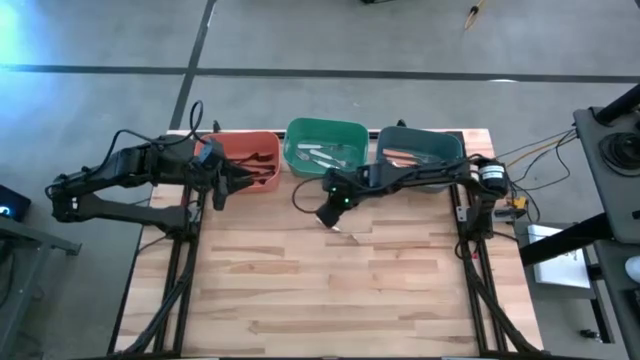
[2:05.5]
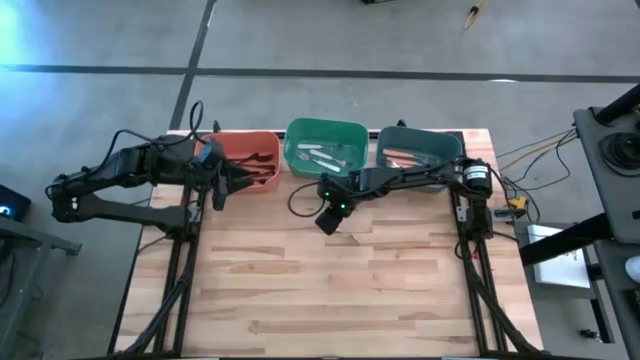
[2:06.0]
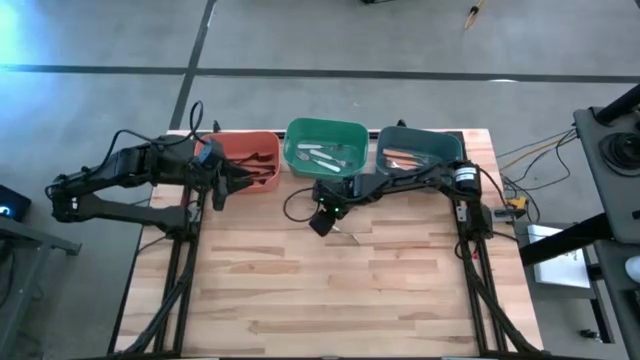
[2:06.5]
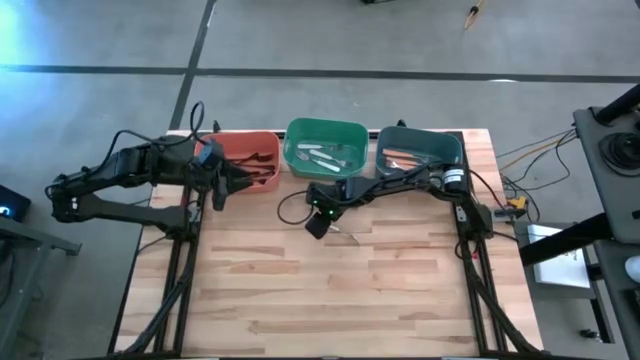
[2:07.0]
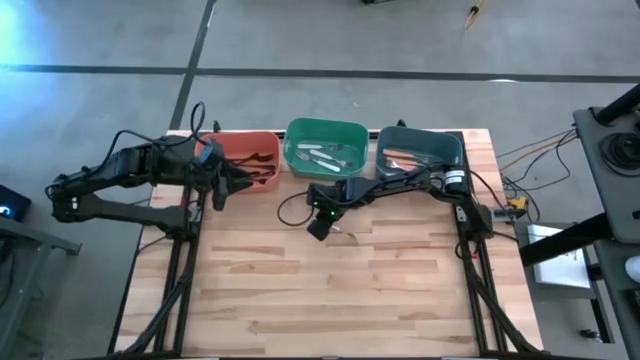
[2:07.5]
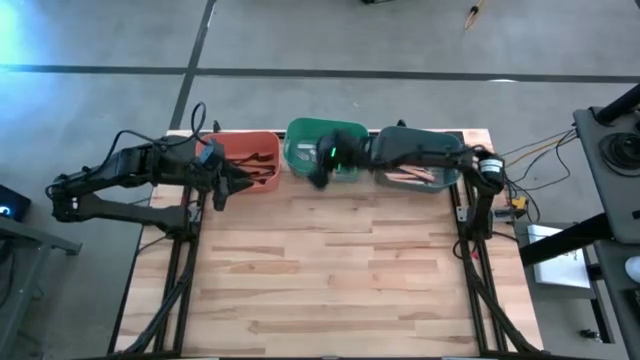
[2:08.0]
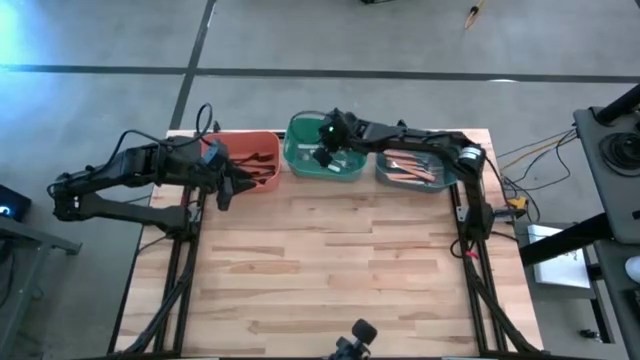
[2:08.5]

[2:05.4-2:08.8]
Task: Sort silverware by color (type)
Put the white fork into the green bin

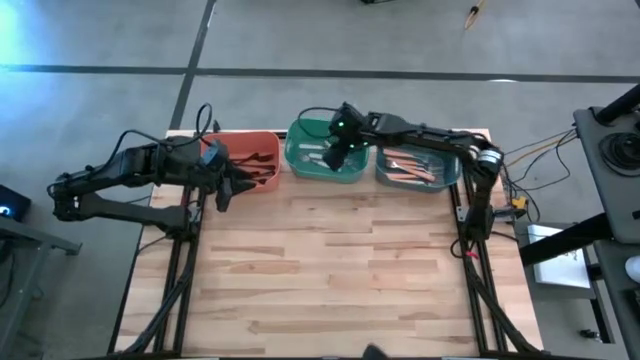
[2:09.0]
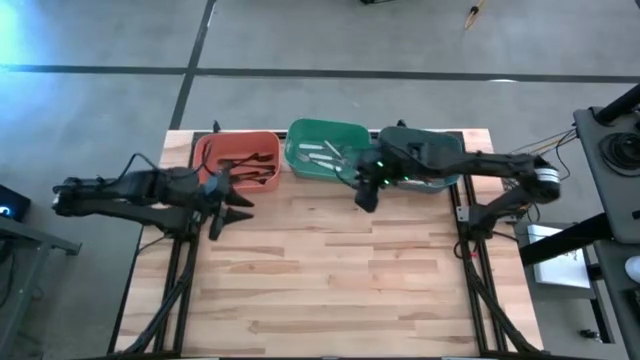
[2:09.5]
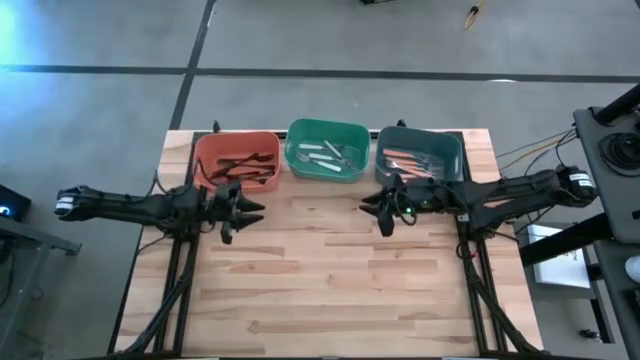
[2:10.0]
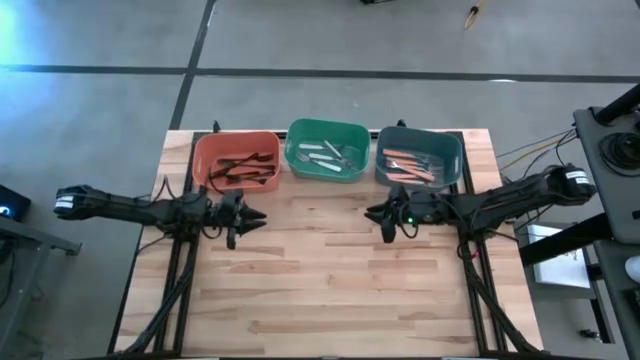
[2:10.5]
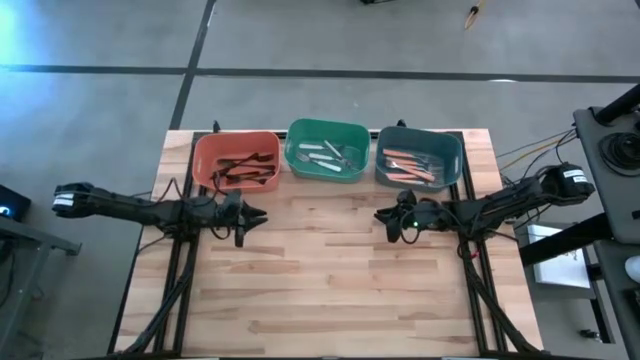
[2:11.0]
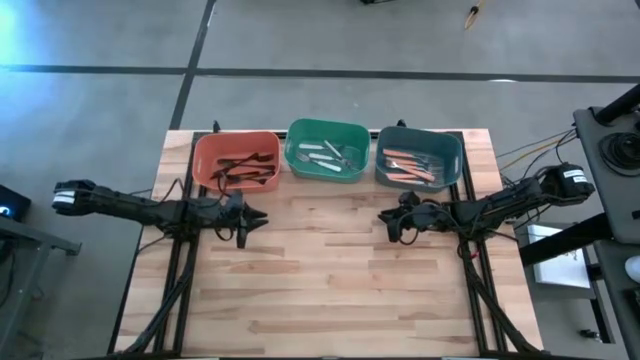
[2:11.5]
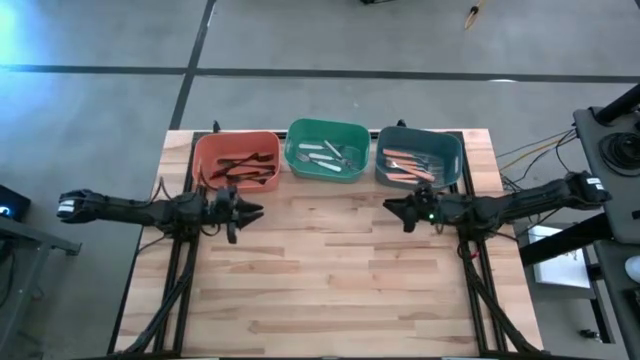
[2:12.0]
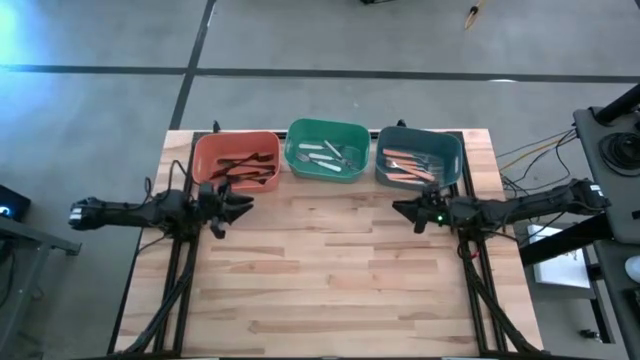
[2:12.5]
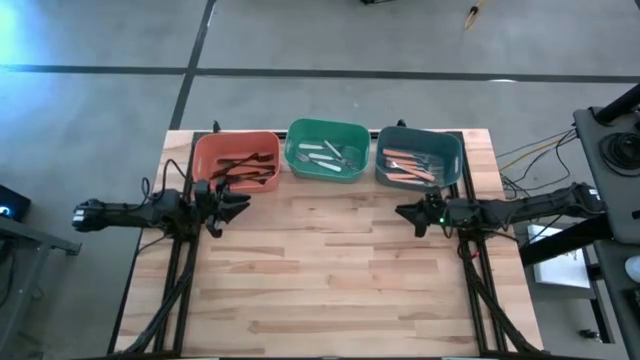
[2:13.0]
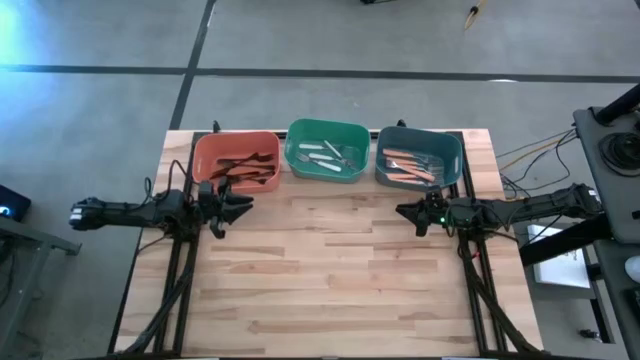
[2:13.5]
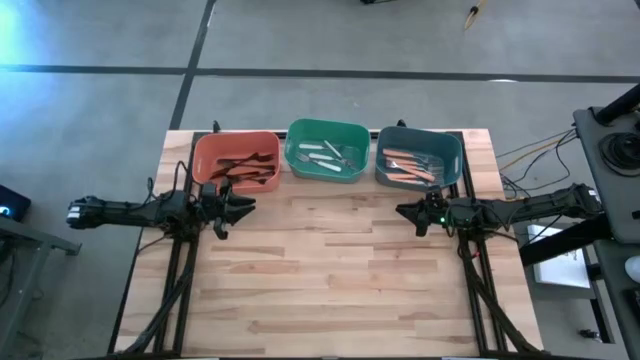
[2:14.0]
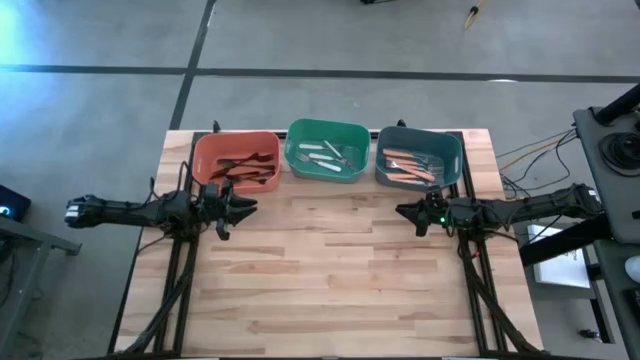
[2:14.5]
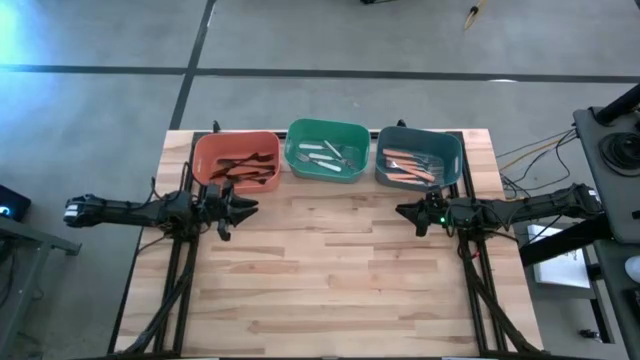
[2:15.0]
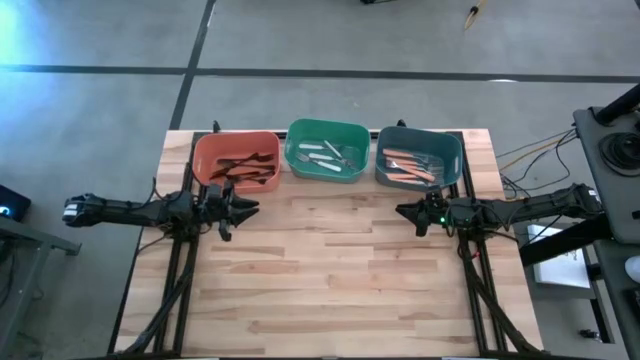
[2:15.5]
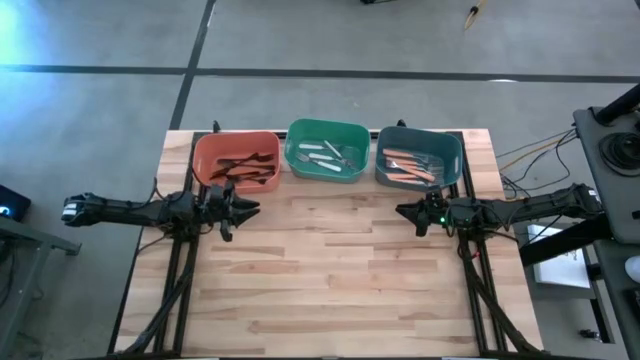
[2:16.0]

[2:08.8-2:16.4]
Return to Home Position

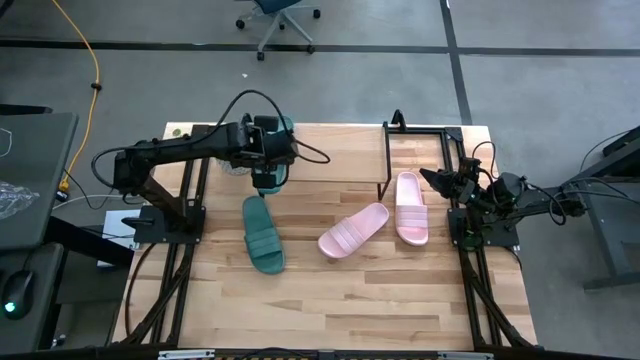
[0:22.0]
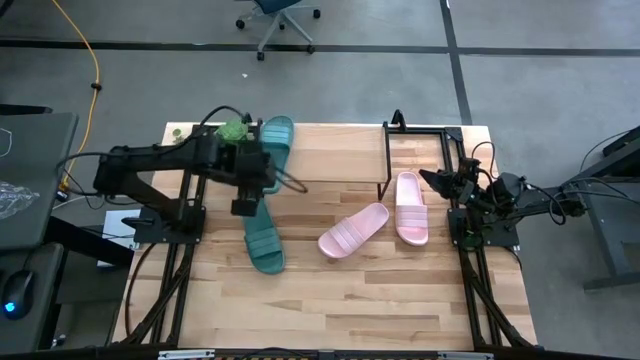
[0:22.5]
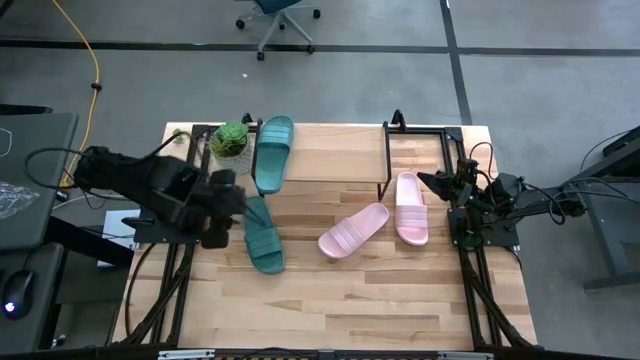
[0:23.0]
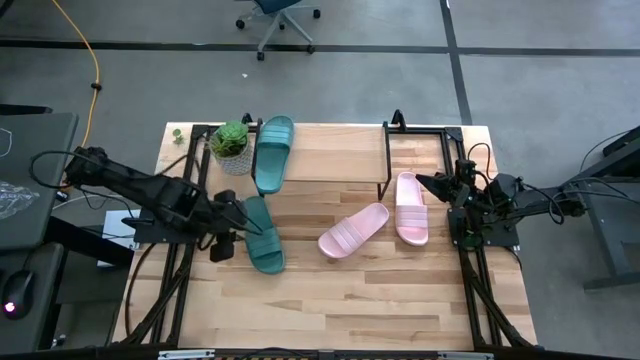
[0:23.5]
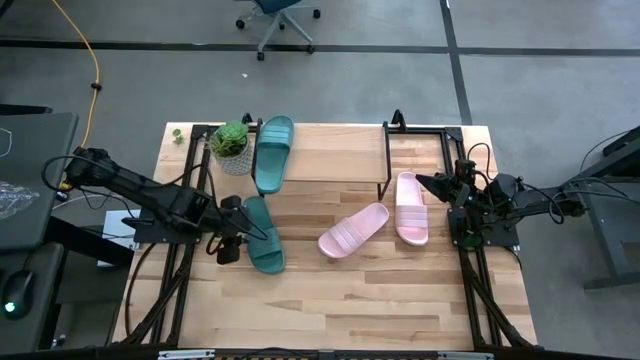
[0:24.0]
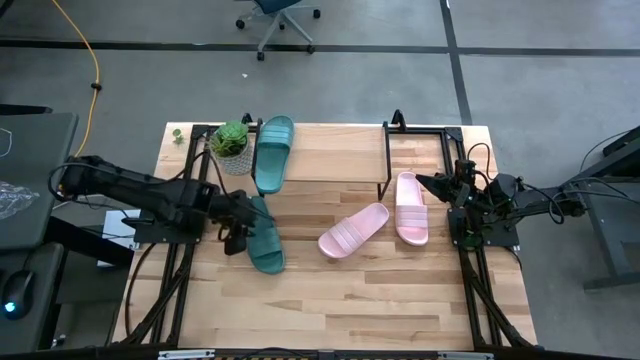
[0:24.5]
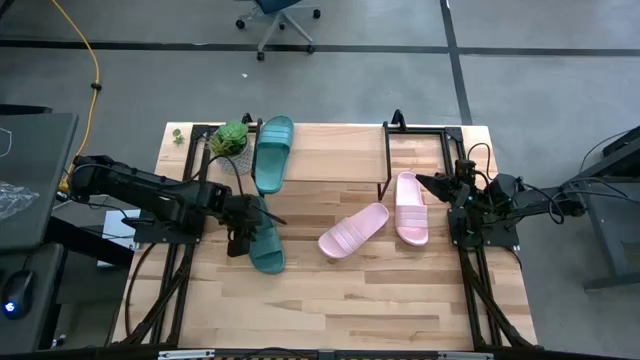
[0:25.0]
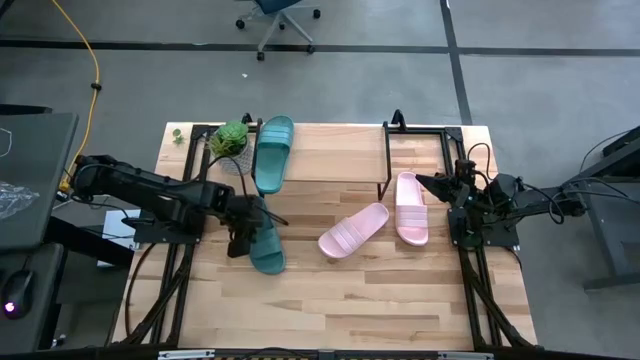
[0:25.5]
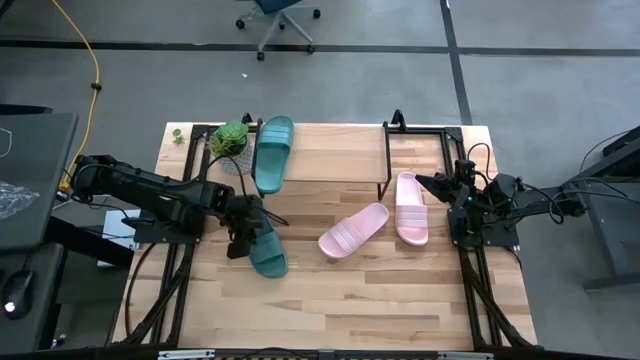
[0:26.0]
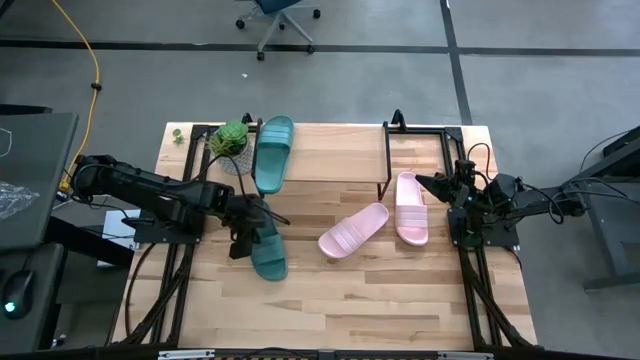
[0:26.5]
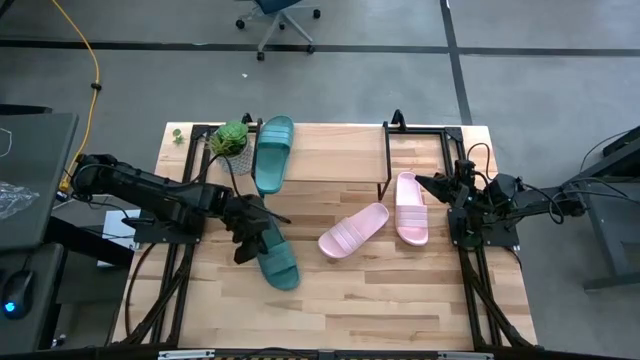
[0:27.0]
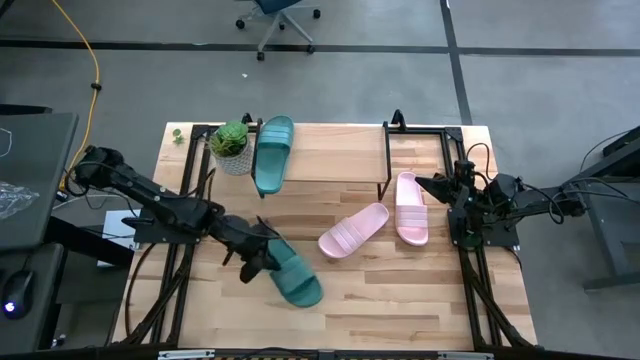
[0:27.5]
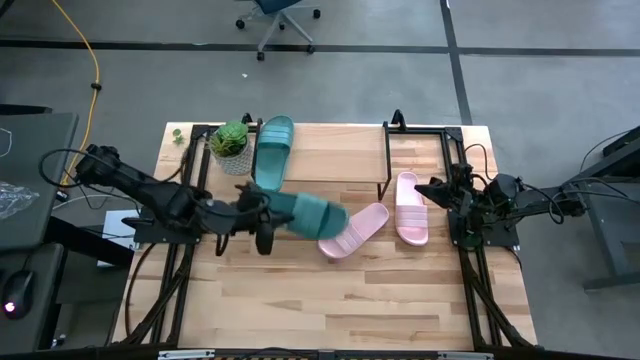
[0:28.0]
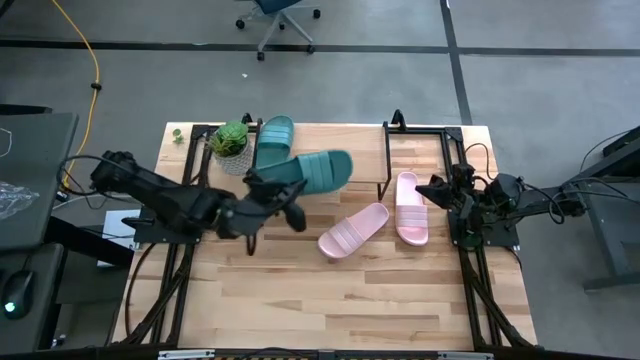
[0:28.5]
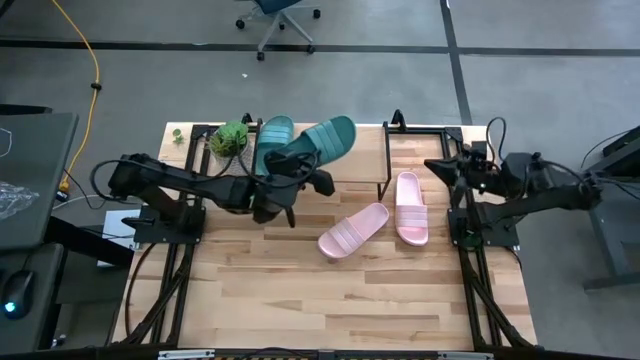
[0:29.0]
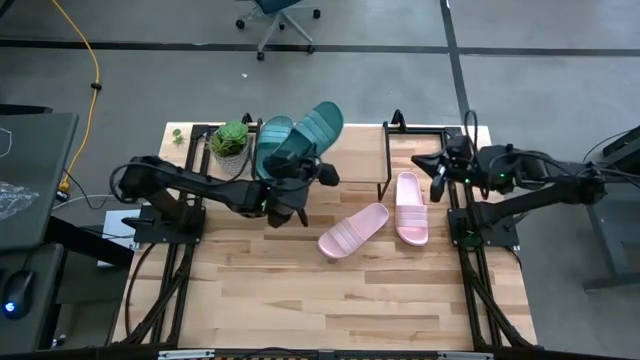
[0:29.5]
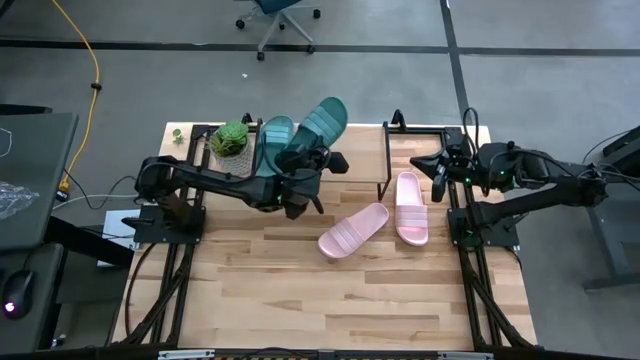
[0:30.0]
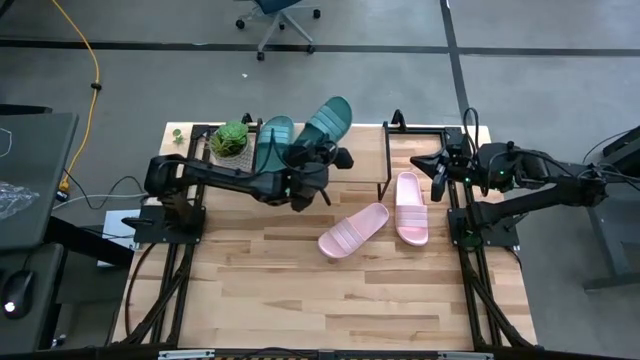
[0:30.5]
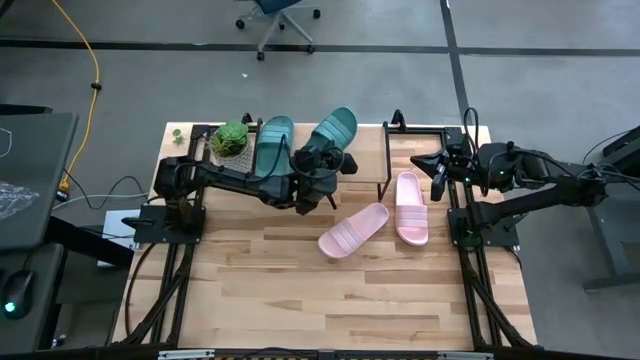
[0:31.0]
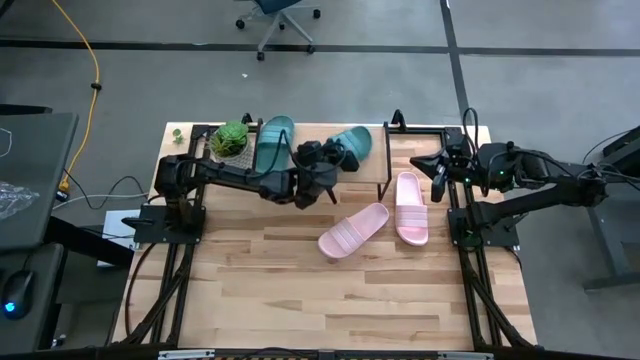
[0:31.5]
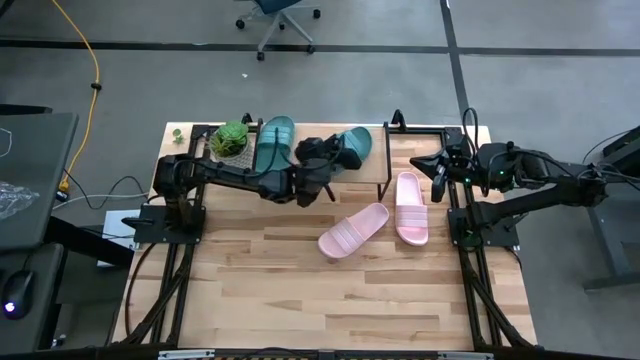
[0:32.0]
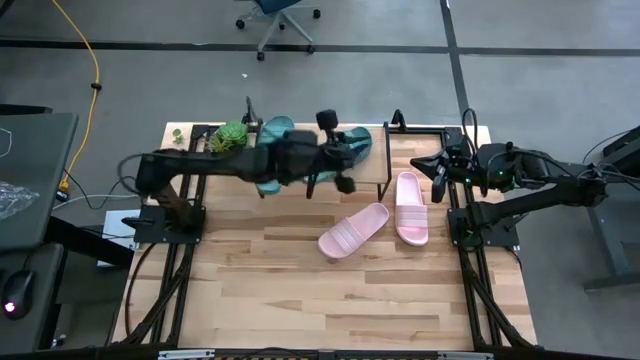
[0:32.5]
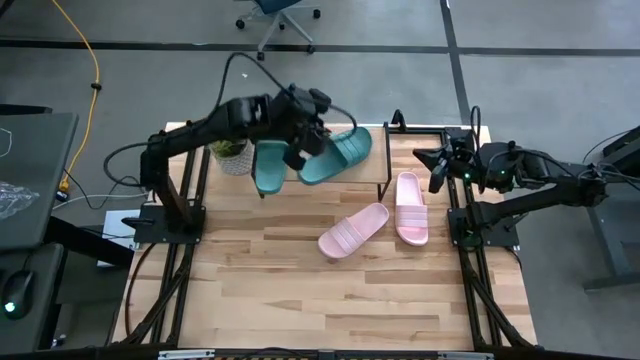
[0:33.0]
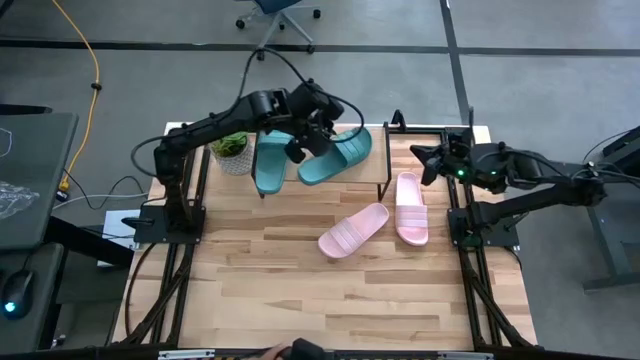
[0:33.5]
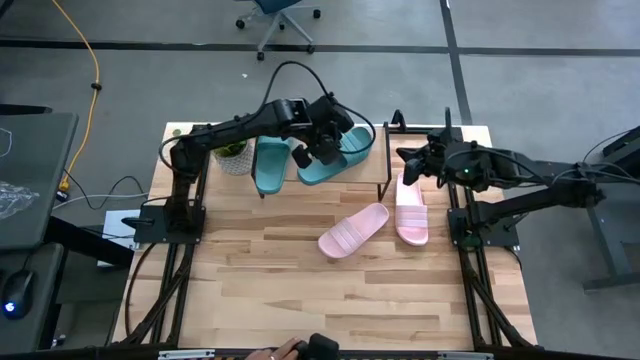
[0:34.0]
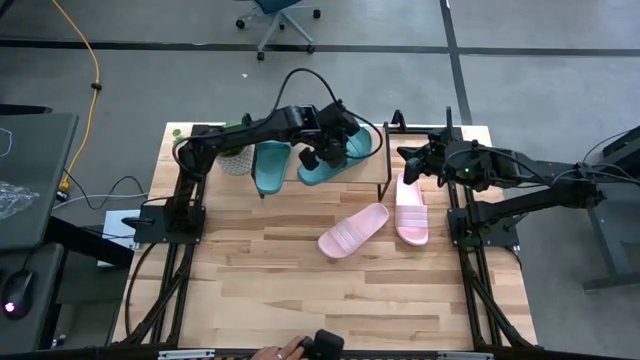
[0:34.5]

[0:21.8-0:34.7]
Task: Pick and place slides into the shelf
Put the green slide on the shelf
